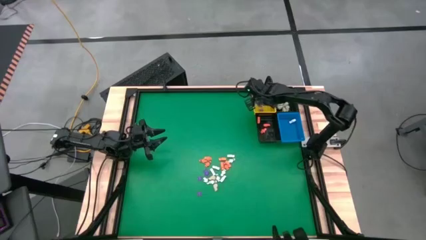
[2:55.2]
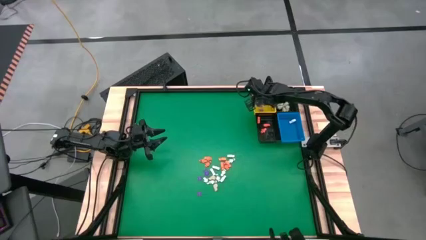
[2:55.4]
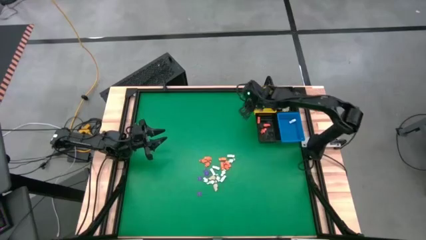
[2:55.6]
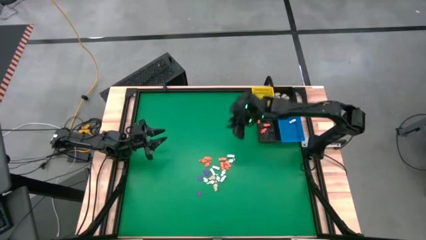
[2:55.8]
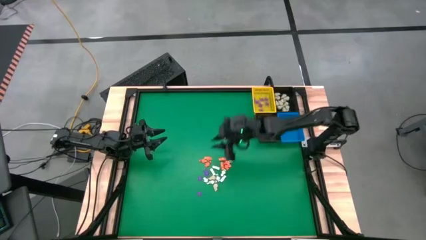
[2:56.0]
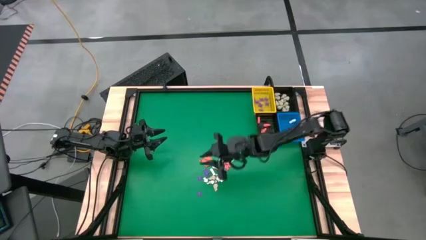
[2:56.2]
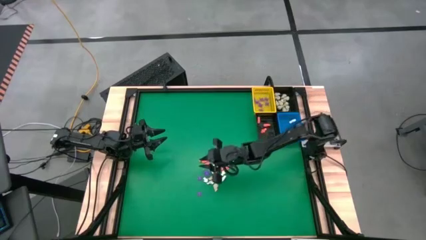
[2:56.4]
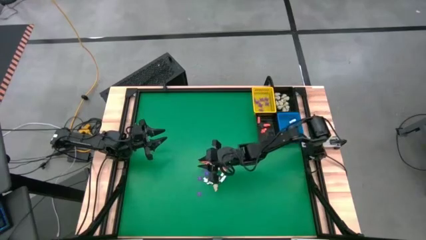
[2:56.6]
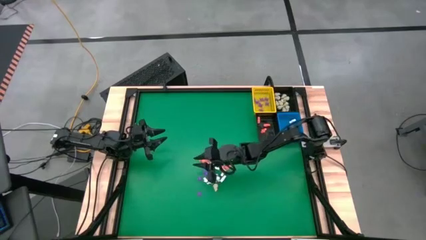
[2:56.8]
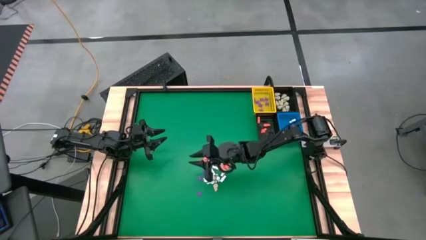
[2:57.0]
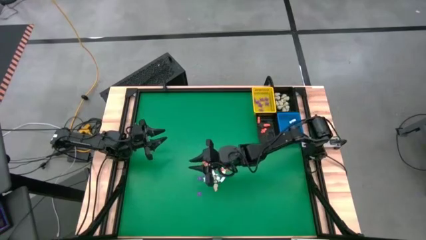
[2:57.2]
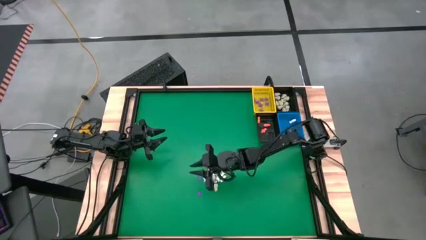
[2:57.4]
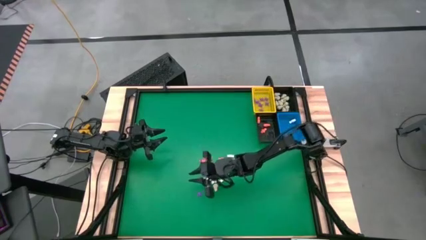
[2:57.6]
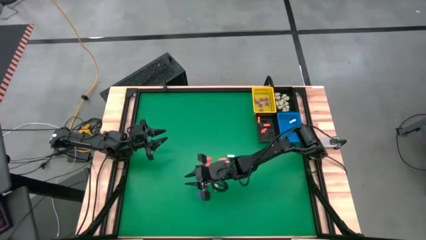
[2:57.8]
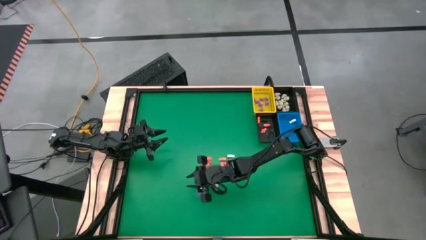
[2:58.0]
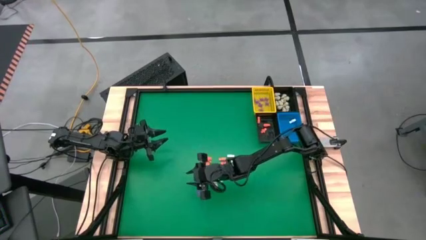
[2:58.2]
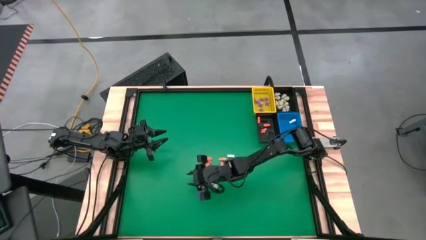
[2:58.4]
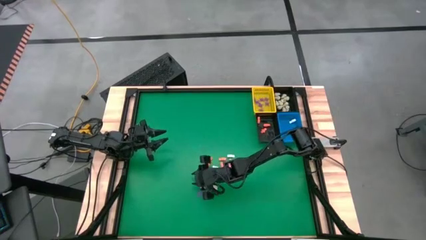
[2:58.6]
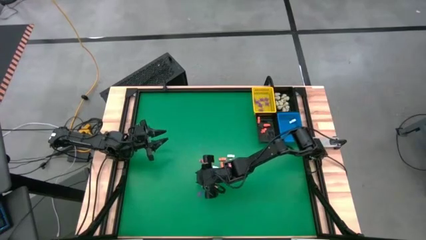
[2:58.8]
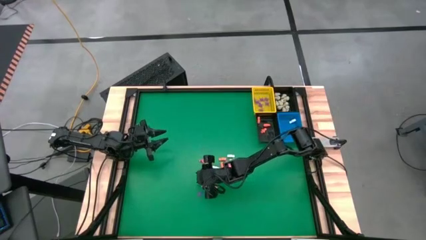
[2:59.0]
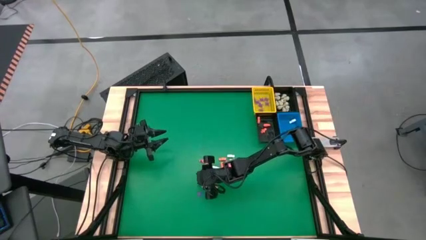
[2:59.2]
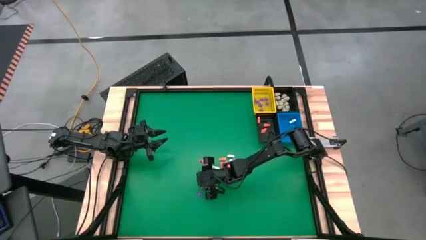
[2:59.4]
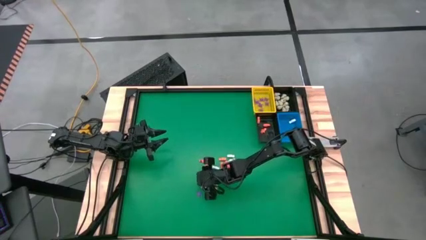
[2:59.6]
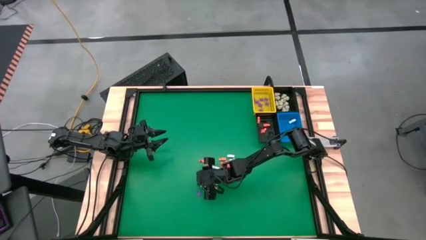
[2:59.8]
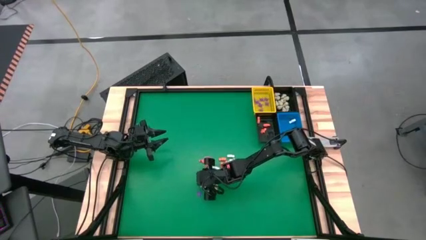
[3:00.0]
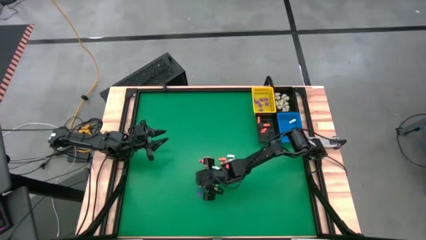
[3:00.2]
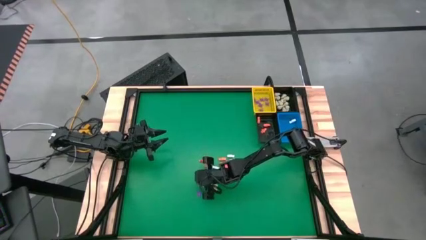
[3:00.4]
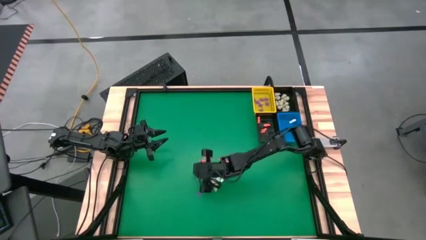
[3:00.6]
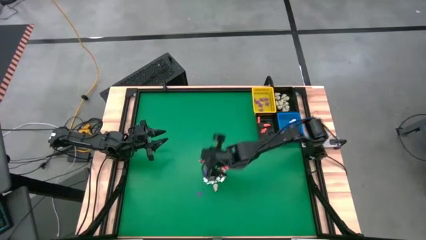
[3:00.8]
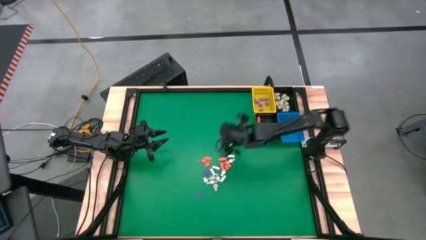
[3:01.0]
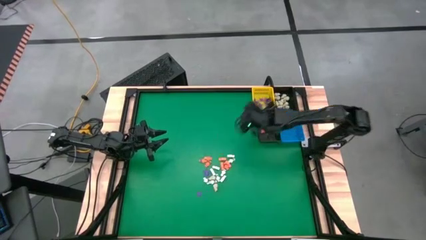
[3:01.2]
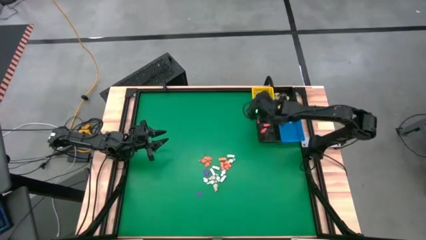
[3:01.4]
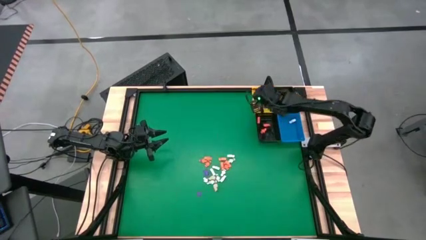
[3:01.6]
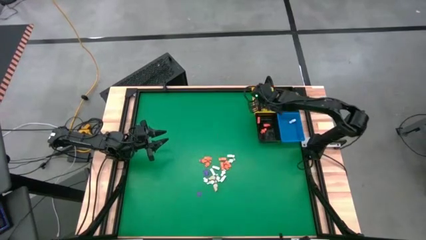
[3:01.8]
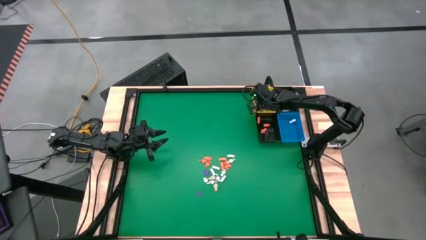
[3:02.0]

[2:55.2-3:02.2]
Task: Sort Halloween decoration
Put the purple spider toy into the yellow basket

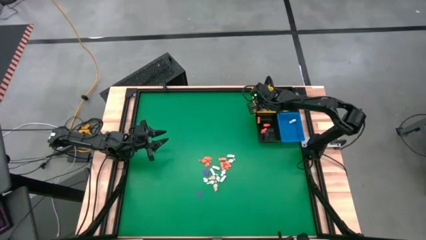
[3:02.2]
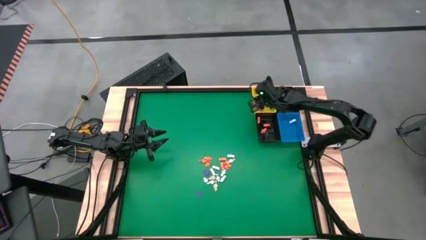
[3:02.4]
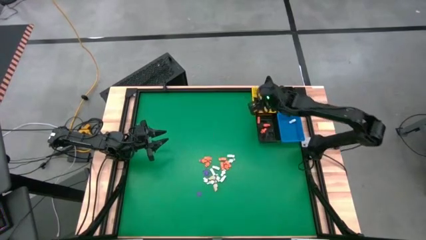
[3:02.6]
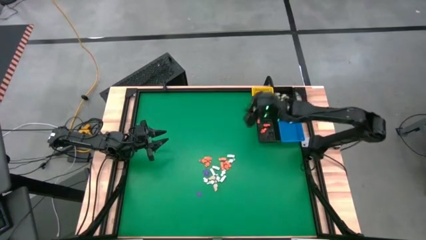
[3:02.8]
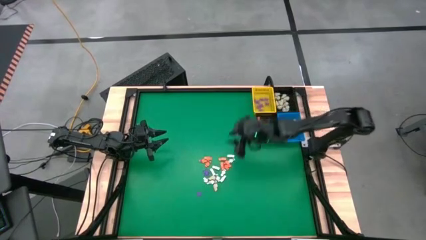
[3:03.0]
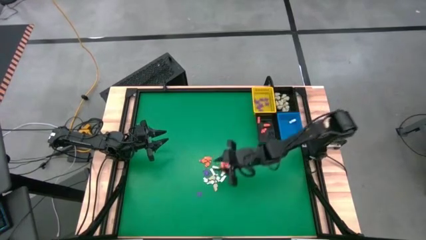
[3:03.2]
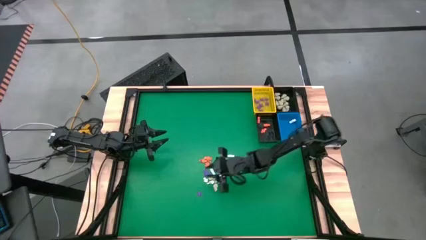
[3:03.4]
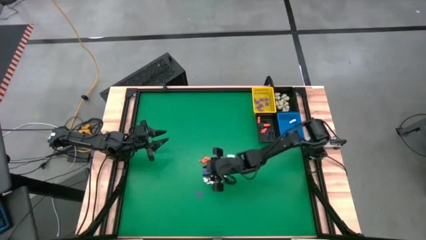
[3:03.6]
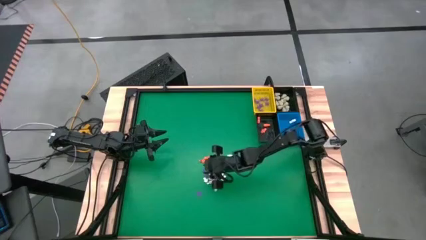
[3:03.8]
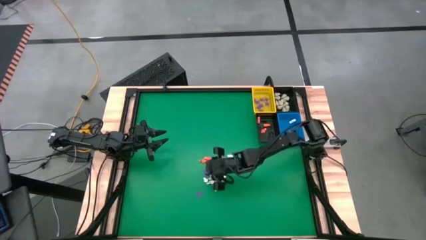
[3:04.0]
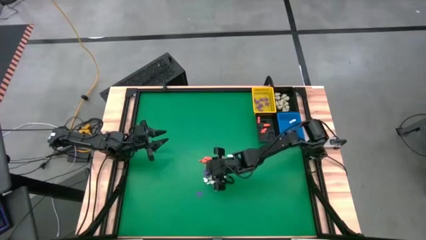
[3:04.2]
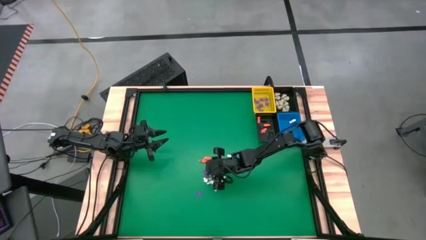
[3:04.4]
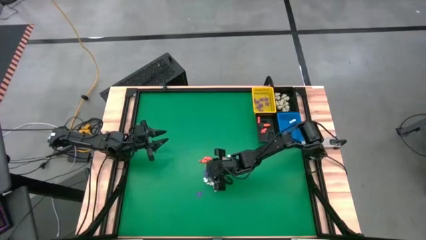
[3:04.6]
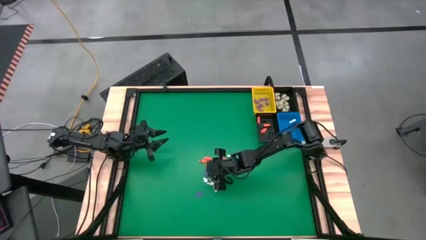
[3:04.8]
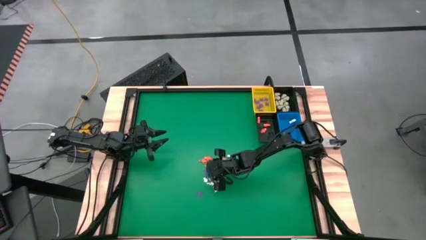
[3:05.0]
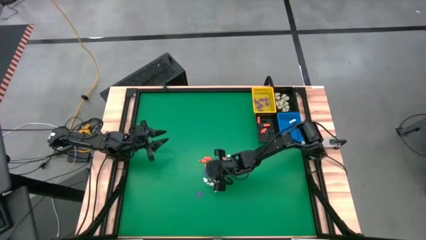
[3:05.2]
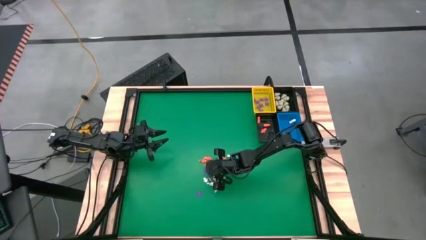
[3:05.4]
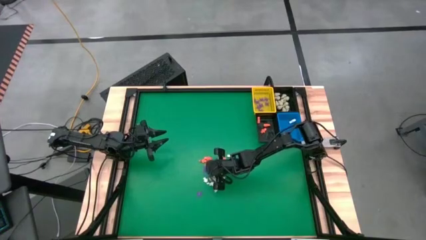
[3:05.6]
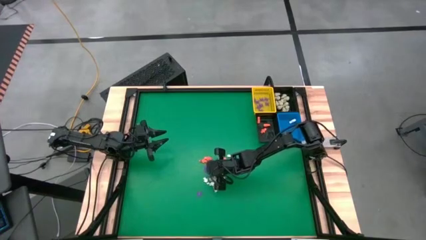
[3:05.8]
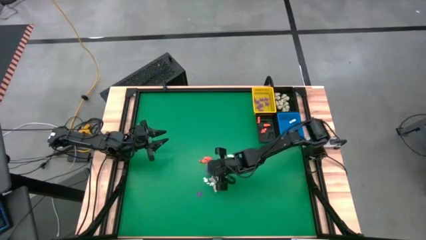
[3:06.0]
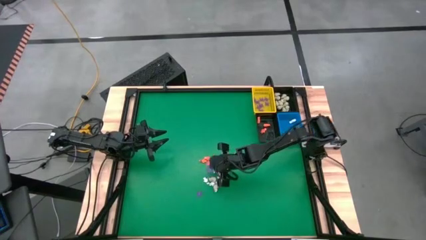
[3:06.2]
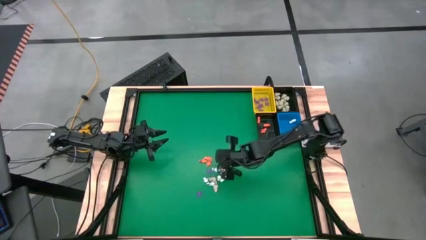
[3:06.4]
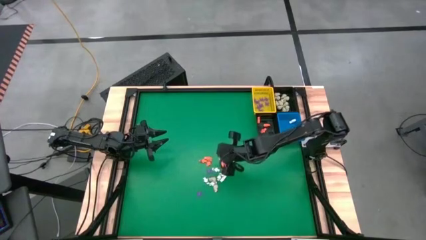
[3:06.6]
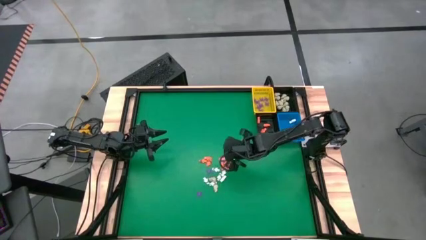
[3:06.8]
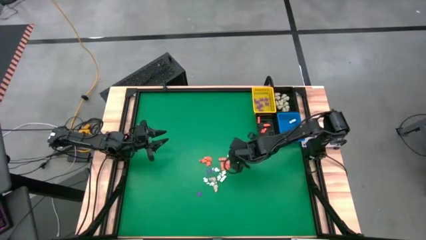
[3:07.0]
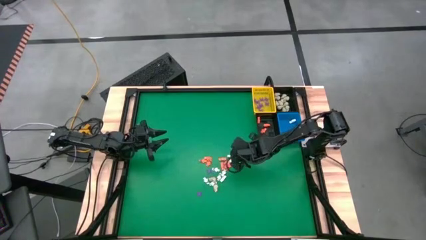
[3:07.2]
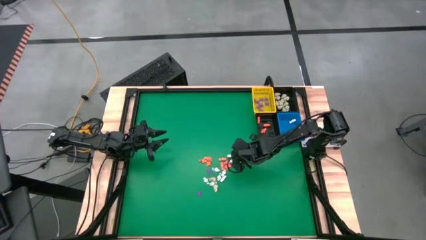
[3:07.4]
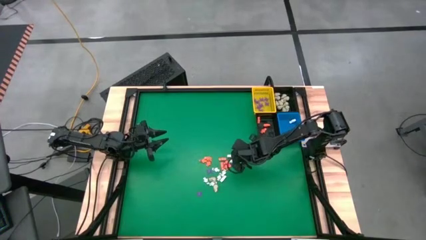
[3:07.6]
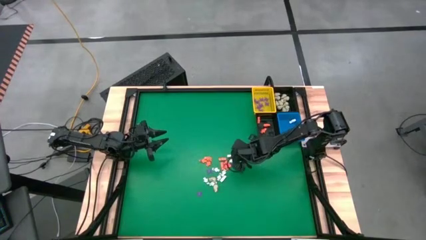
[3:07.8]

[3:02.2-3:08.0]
Put the purple spider toy into the yellow basket

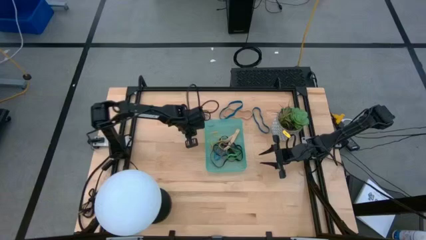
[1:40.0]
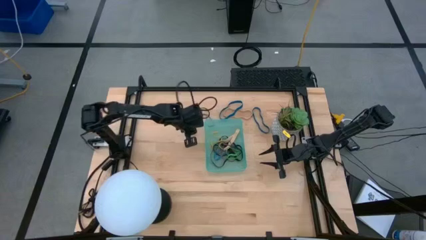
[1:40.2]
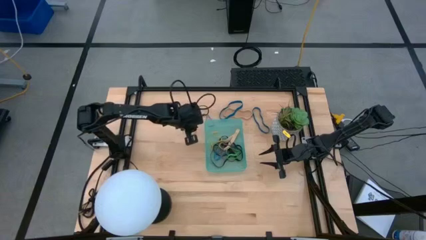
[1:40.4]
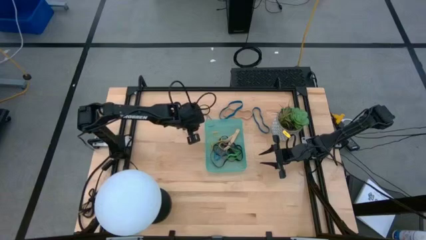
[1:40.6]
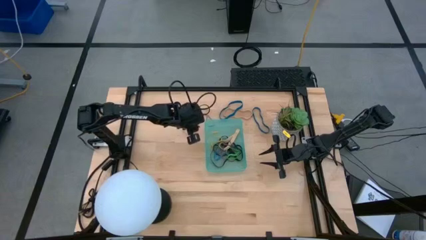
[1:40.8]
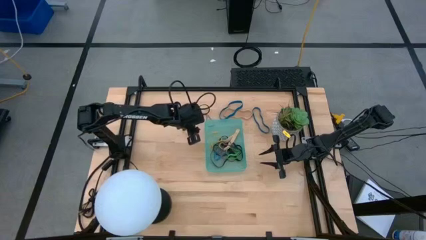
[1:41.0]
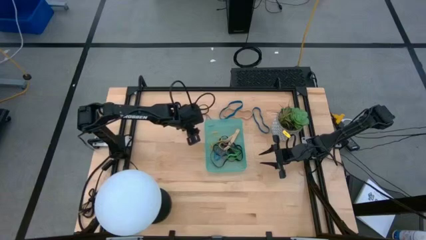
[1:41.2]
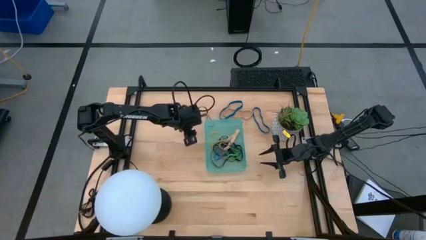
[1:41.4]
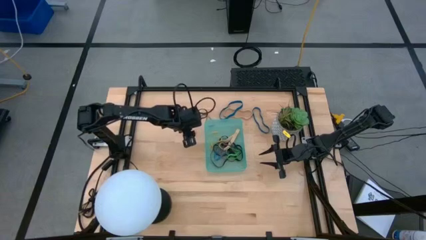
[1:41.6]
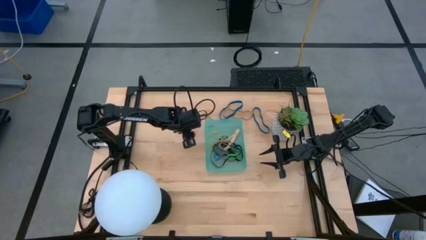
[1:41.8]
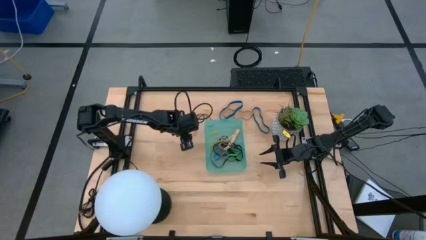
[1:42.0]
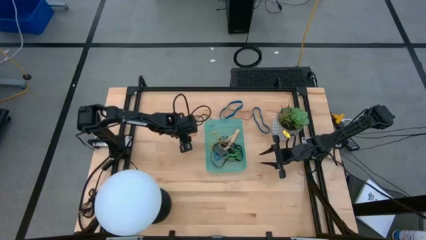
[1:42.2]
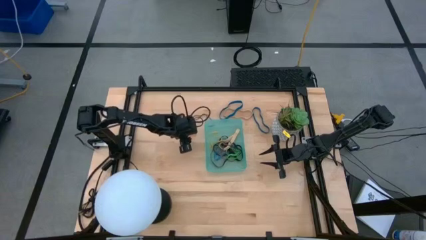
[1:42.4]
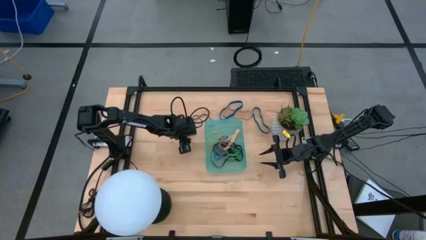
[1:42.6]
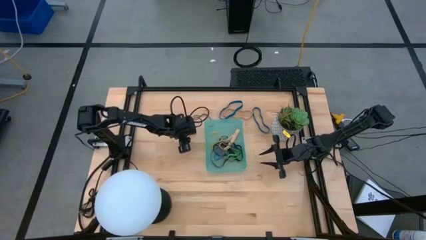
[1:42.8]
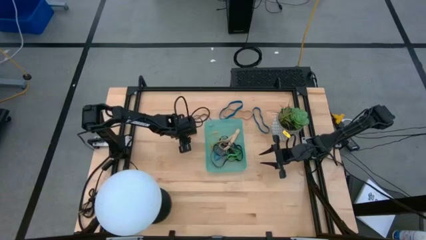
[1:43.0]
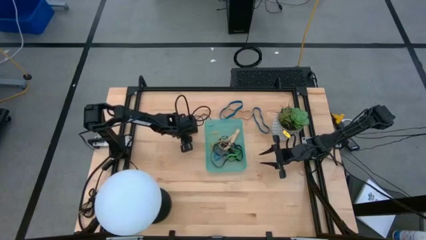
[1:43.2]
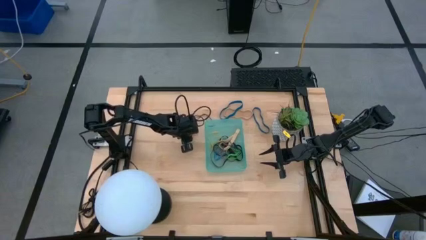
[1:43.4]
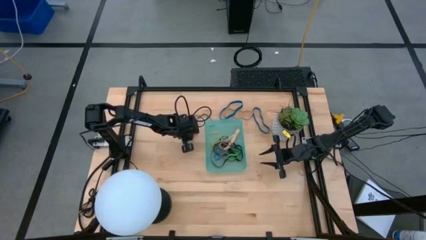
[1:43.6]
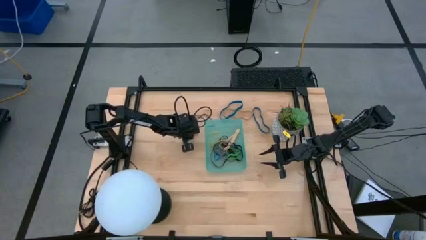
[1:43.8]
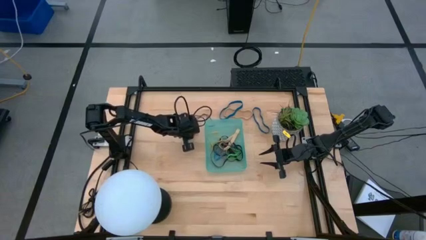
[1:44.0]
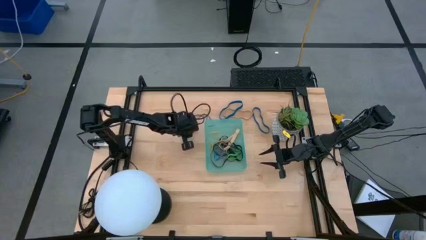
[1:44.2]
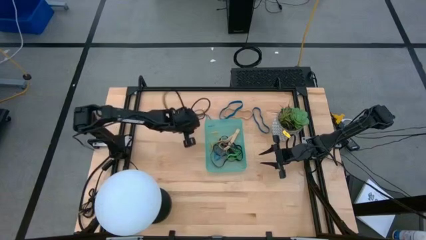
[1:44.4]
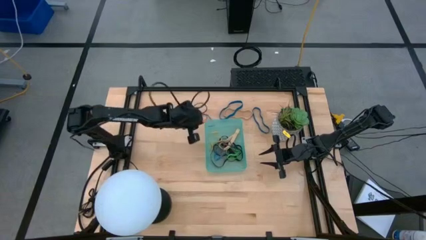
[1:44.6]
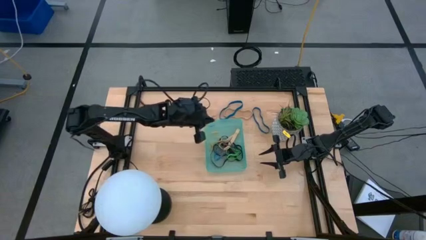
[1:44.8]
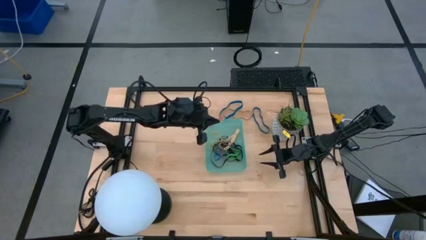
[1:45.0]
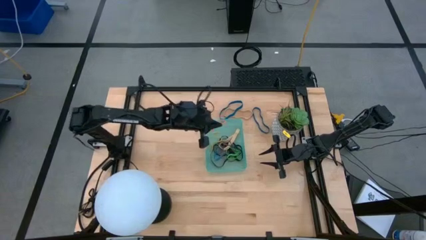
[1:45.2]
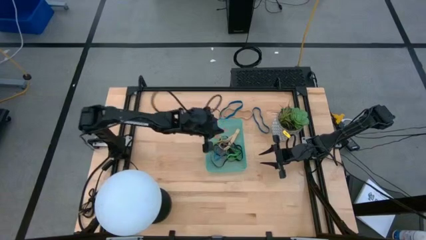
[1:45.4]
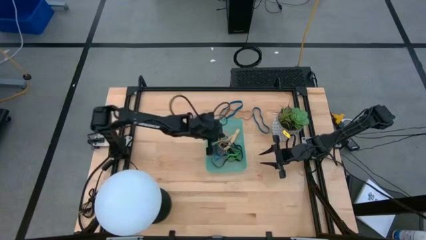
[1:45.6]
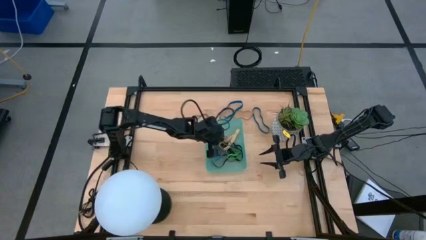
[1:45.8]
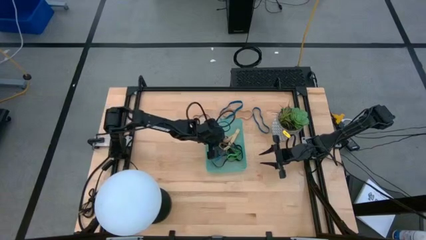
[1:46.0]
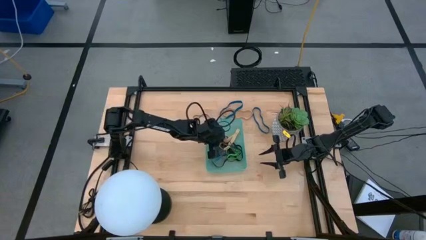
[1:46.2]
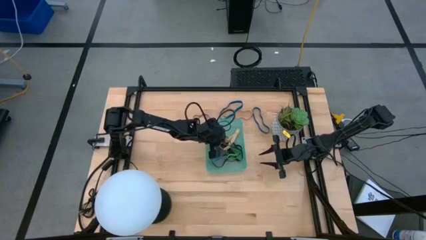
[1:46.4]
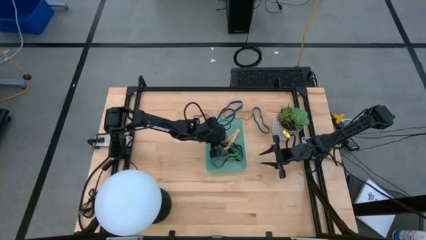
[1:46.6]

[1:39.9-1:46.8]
Task: Pick and place rubber bands into bin
Put the orange rubber band into the green bin
